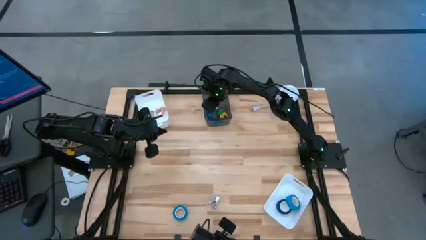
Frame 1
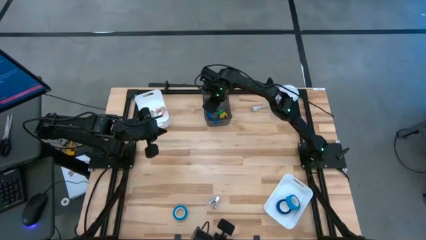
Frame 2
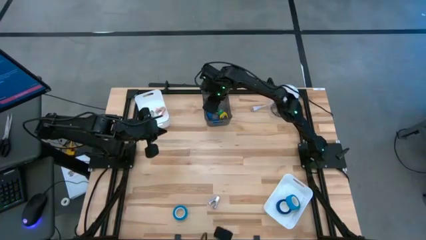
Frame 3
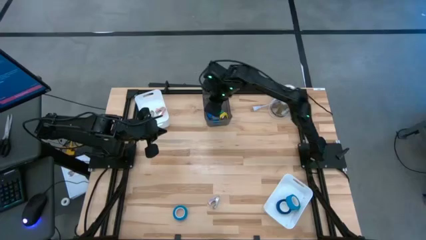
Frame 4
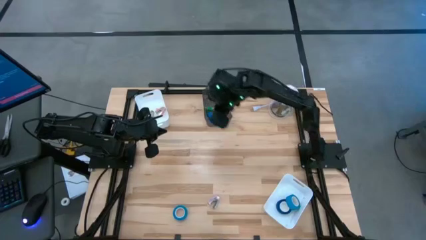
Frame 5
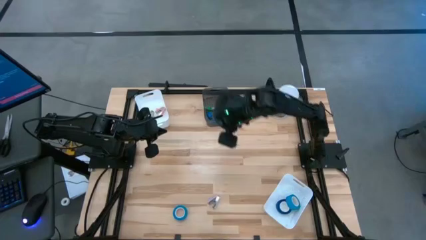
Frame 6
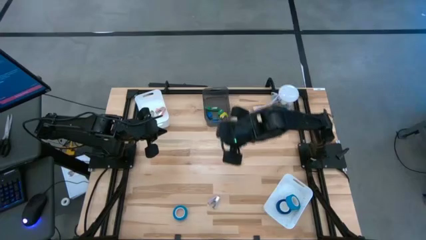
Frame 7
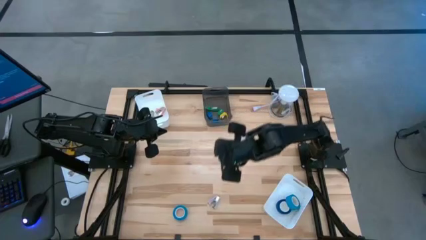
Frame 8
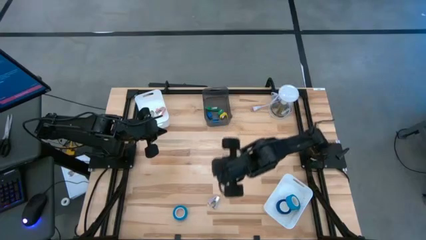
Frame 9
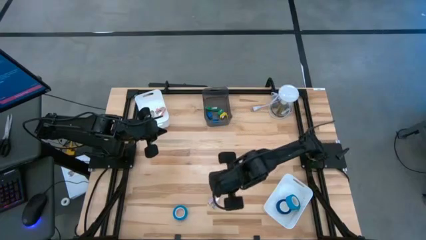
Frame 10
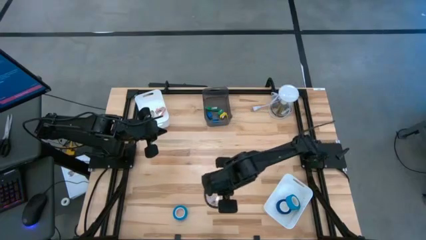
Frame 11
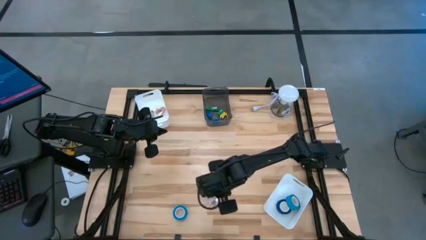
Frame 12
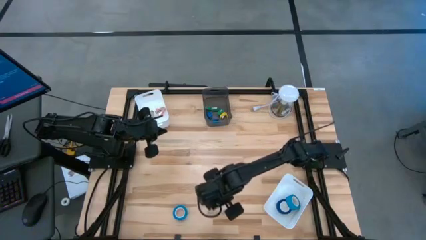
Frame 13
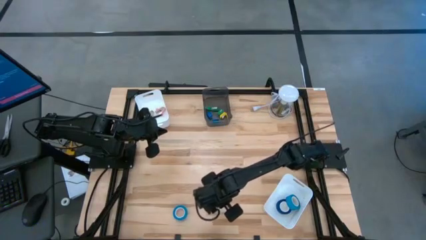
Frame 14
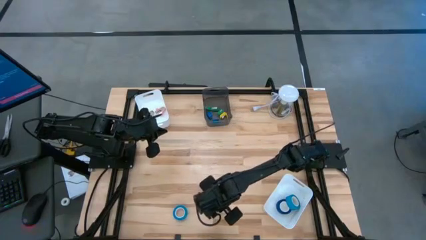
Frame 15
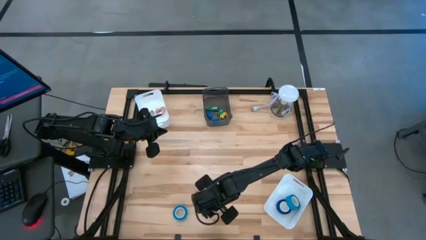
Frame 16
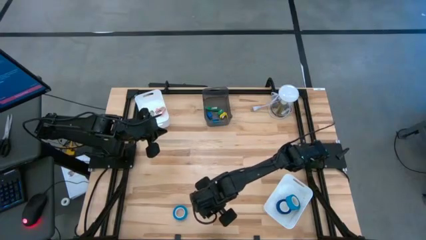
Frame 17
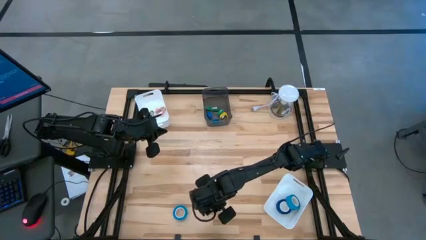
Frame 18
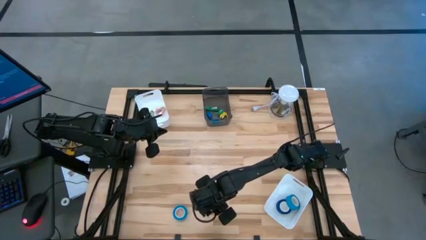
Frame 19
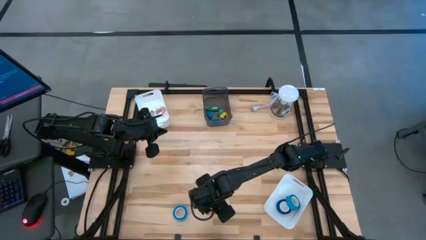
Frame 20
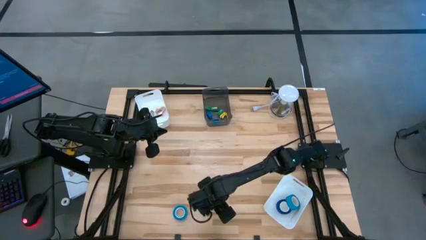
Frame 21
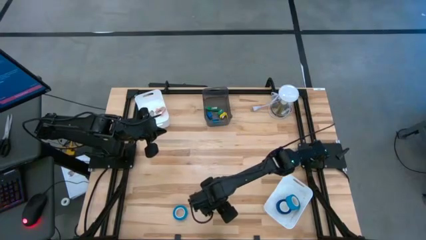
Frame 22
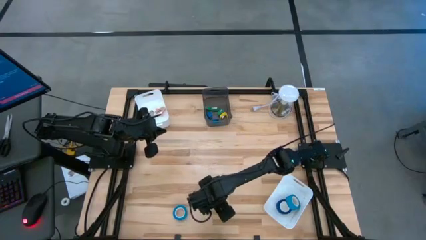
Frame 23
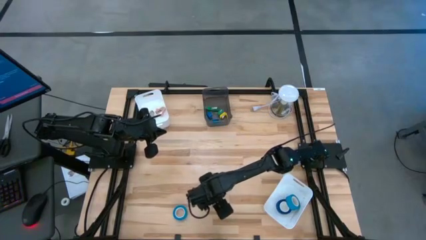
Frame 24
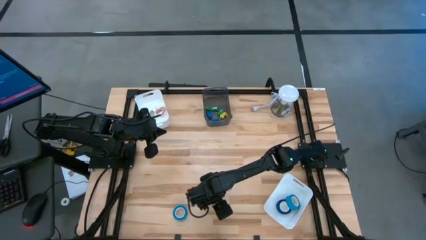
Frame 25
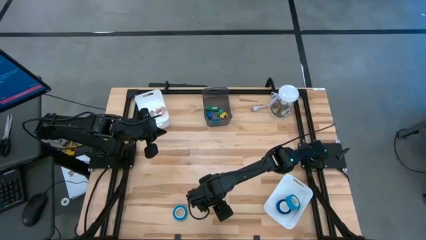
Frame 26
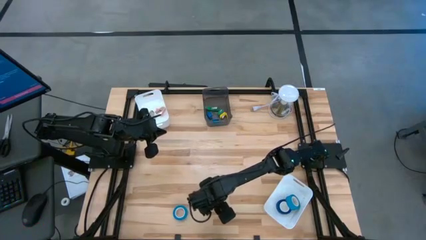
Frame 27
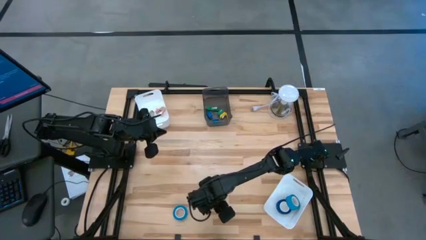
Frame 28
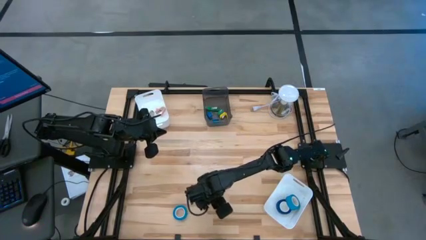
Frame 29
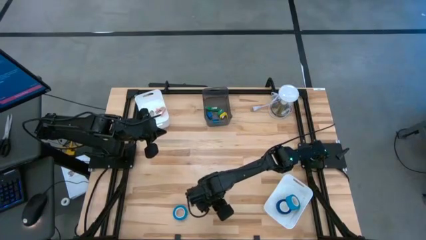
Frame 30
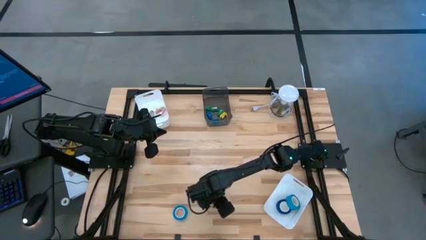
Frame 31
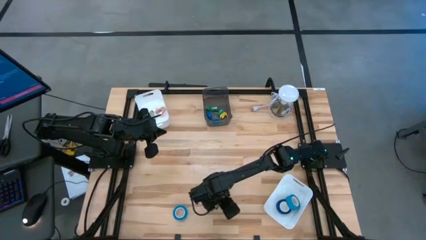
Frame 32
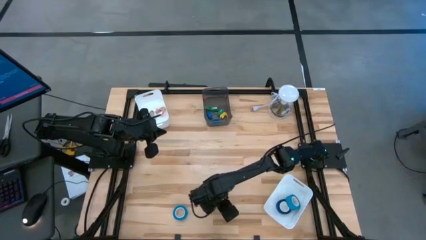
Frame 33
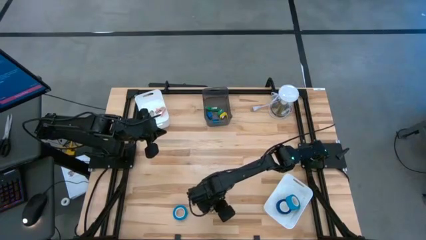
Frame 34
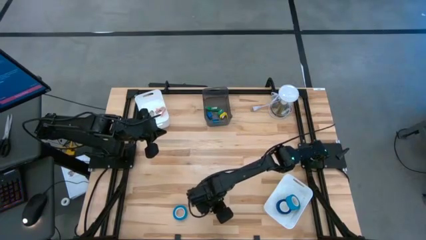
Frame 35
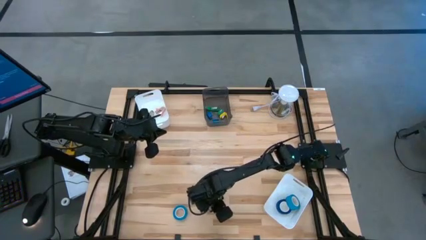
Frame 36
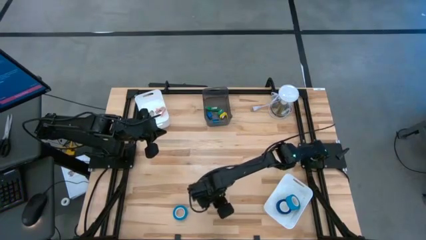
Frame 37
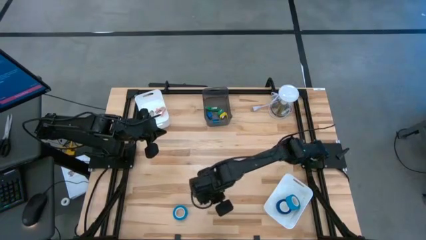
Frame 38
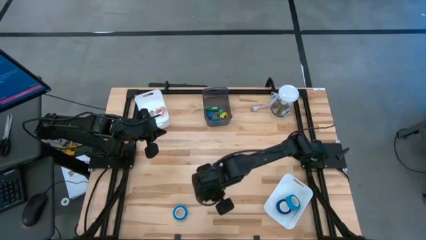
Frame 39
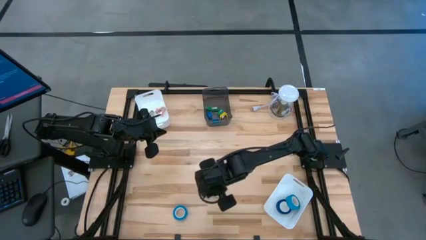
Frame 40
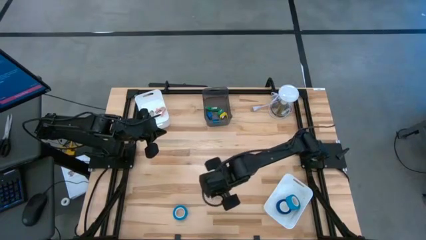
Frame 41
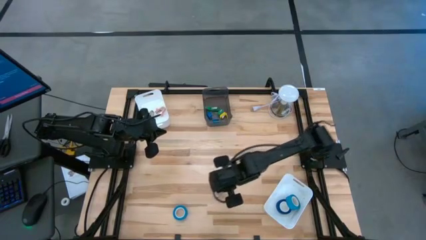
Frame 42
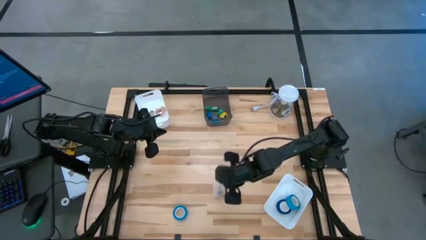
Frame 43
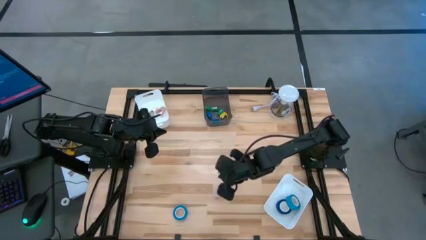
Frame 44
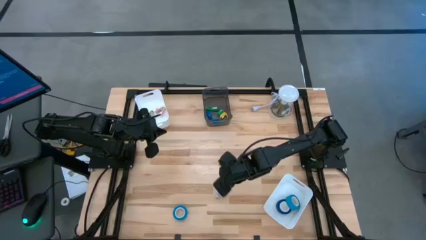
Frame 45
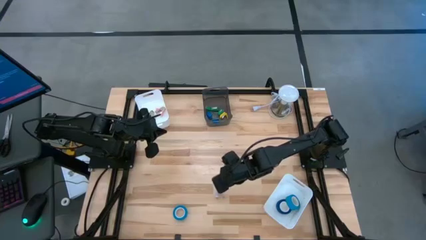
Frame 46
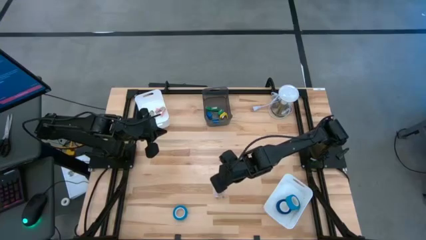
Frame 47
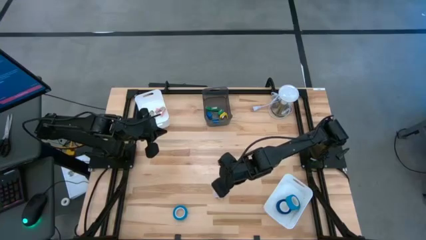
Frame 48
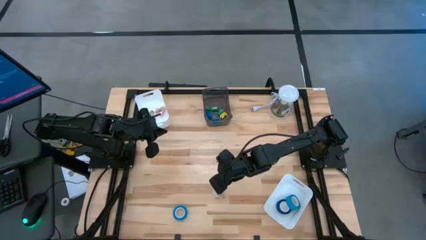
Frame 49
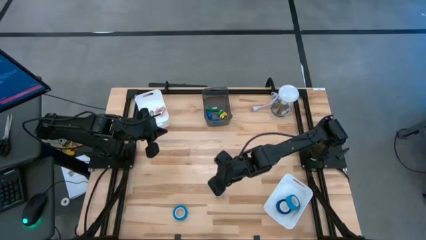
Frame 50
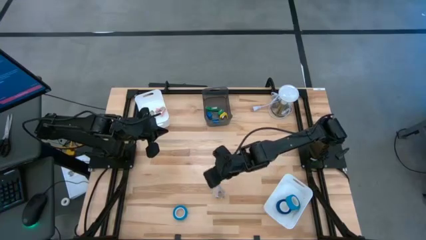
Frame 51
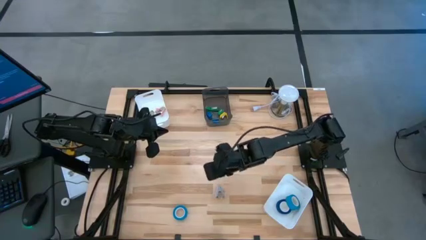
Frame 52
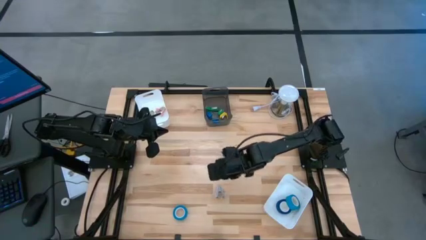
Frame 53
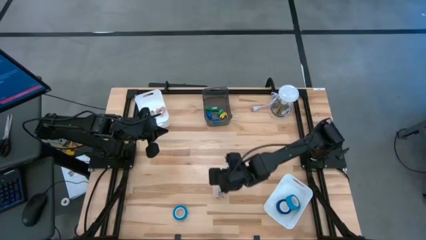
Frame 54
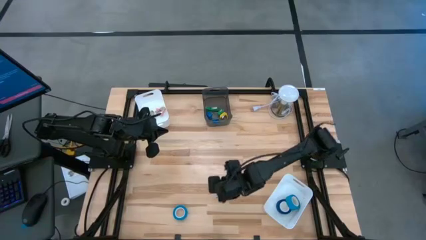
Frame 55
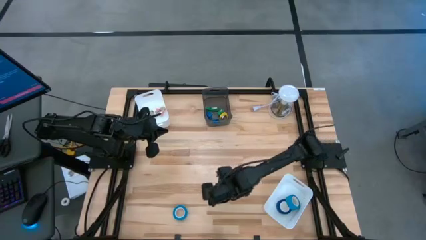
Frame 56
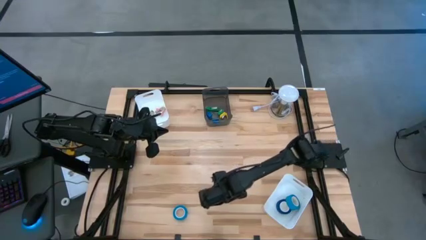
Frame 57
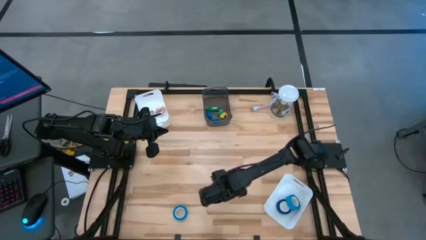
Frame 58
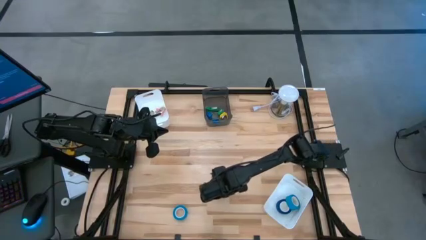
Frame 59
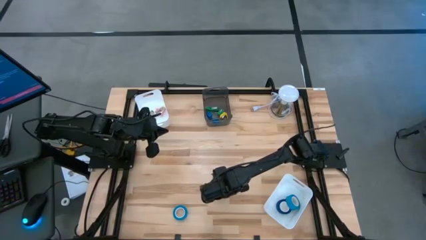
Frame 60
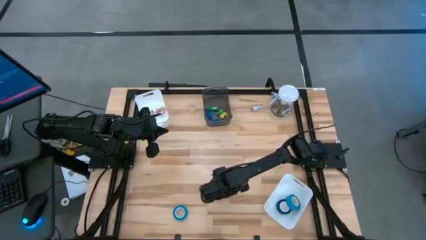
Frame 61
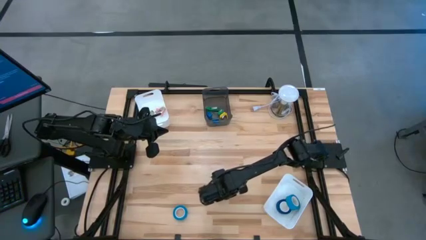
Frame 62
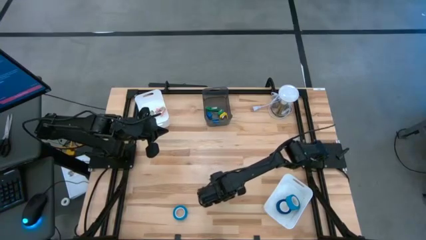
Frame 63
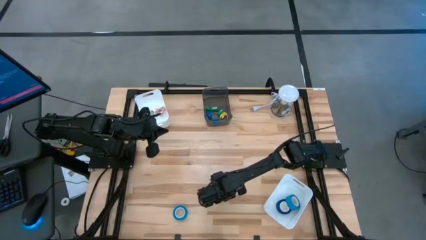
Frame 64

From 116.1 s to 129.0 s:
Task: Pick and place Stapler, Stapler remover, tape
Put the pink staple remover into the top white bin

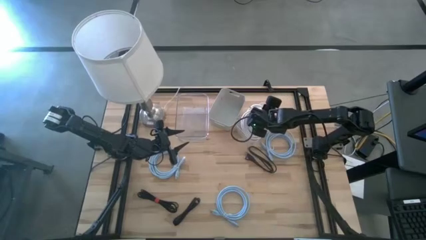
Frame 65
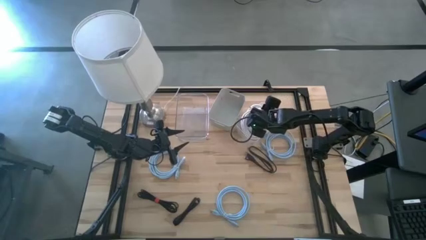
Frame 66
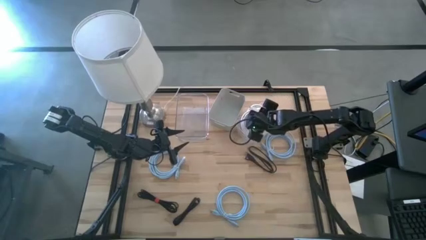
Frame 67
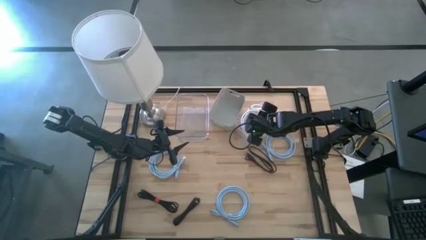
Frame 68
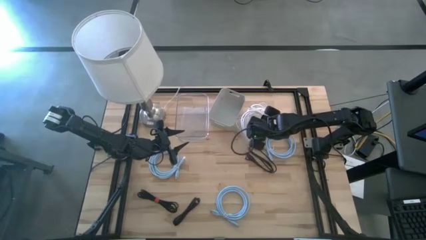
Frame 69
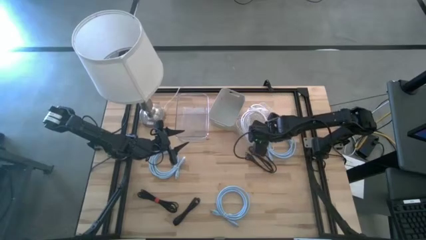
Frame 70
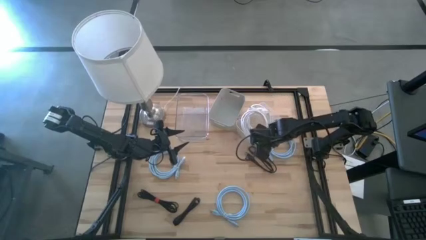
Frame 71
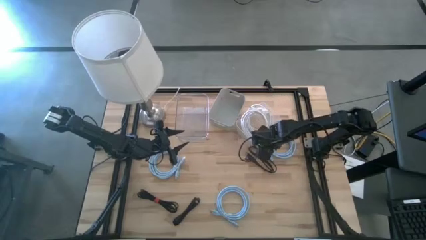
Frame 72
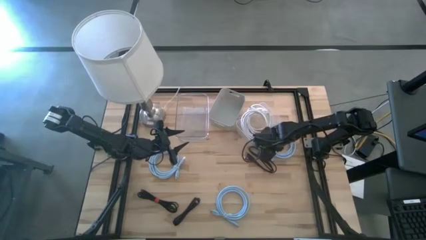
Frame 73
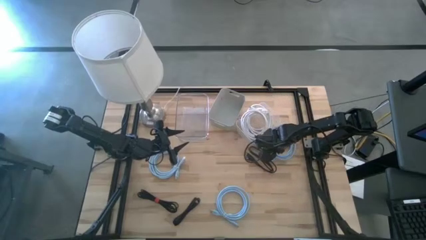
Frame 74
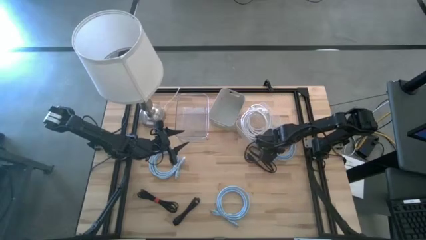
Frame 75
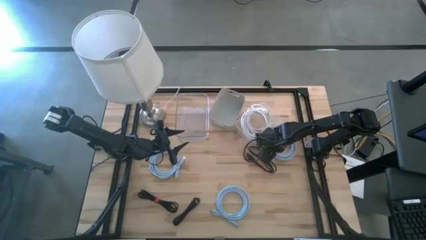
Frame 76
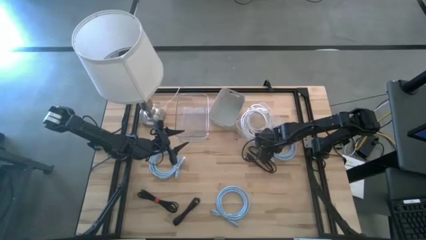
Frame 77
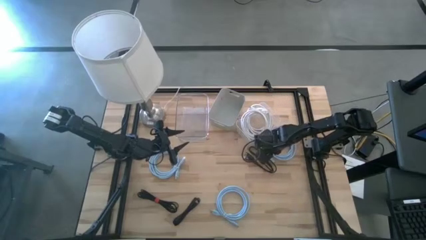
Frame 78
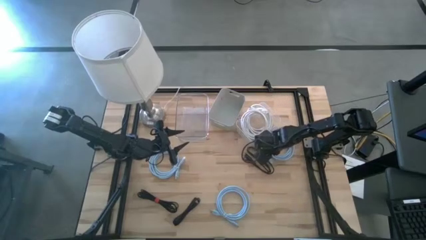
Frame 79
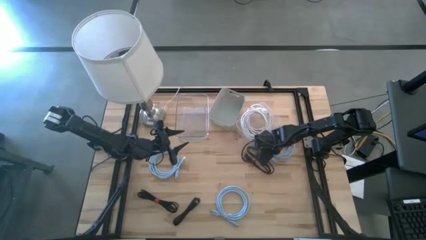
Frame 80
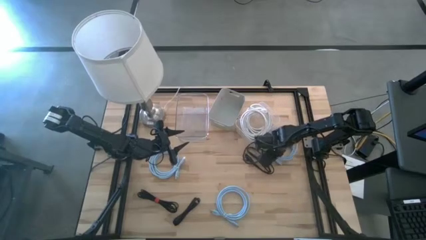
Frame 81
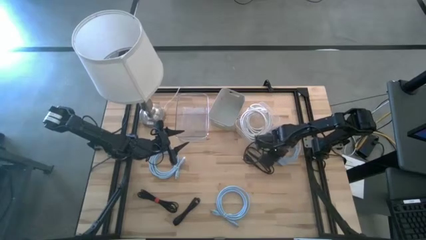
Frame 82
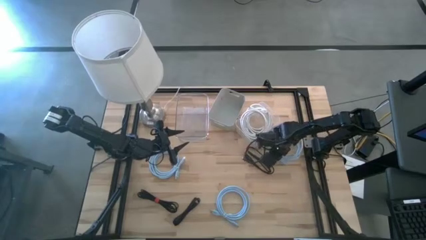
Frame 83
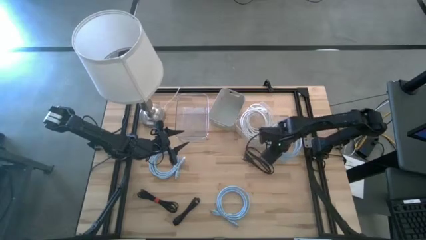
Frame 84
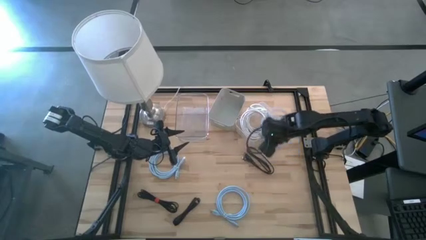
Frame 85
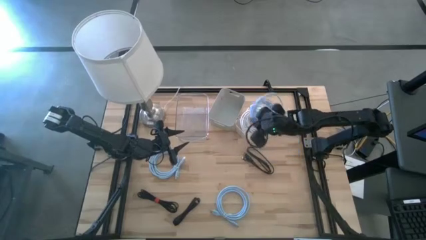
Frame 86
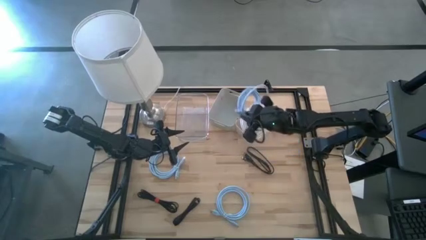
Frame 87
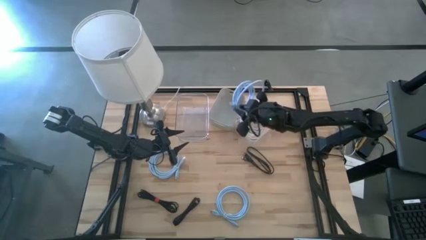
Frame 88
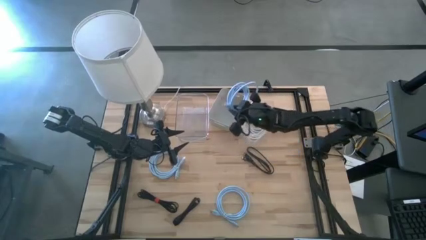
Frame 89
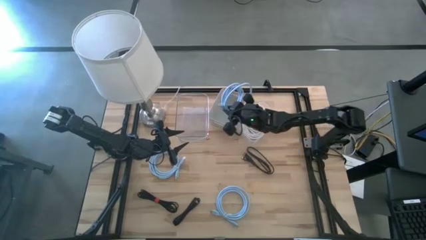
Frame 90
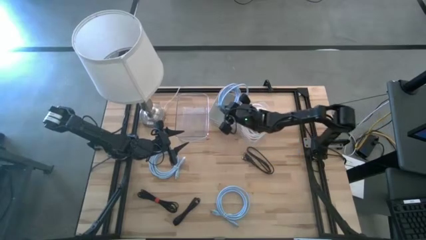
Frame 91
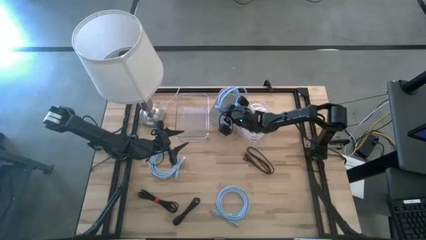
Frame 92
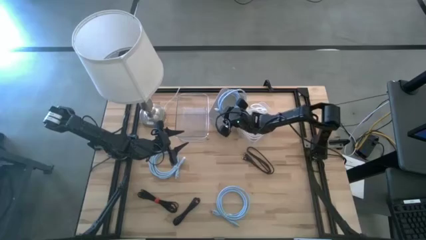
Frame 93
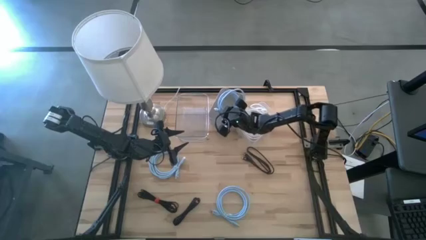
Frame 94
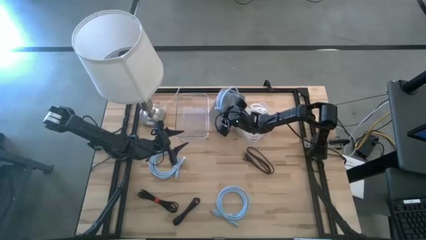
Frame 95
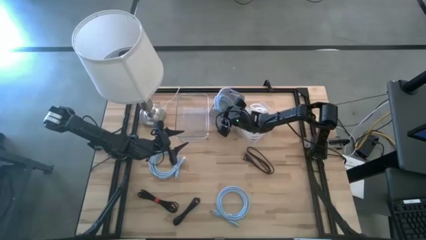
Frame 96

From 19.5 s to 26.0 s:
Task: Sort HDMI cables
Put the top right blue HDMI cable into the gray bin
